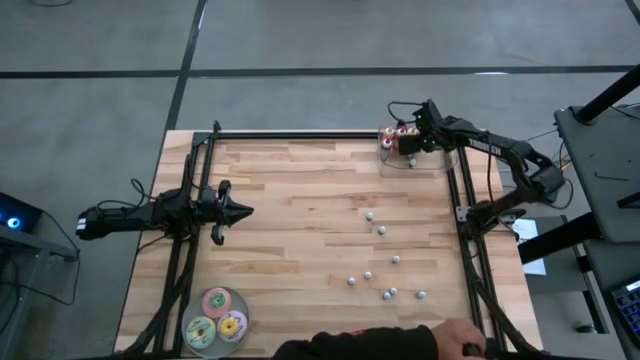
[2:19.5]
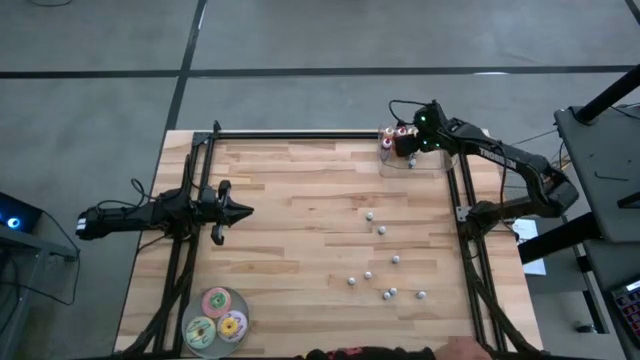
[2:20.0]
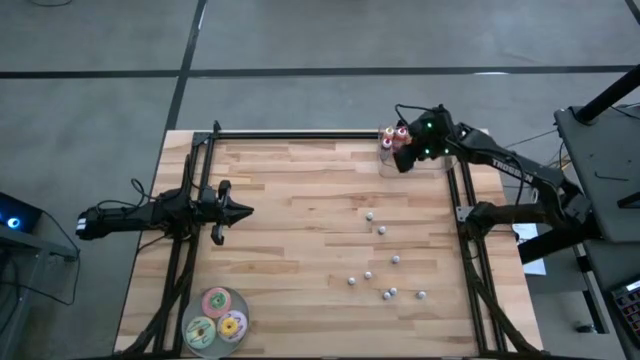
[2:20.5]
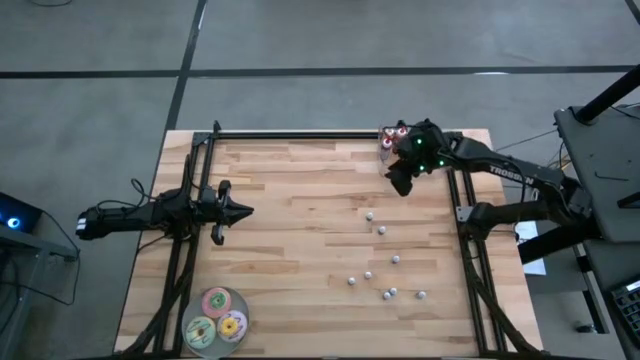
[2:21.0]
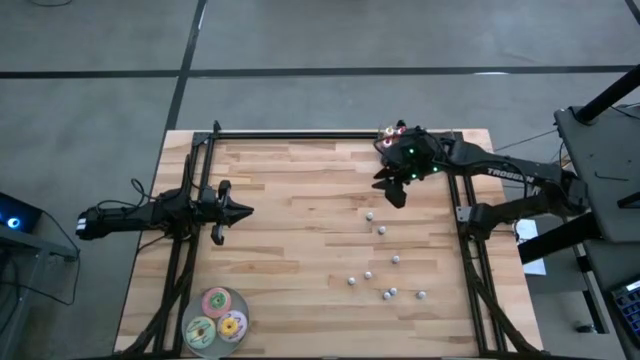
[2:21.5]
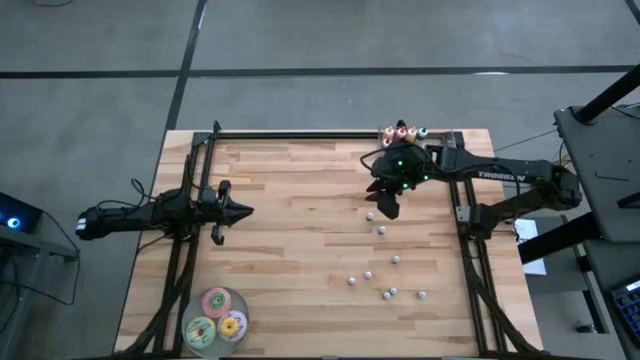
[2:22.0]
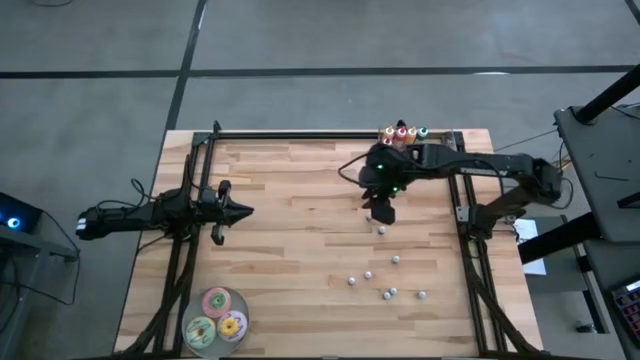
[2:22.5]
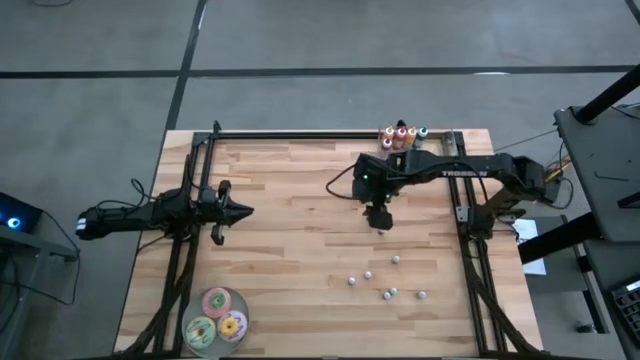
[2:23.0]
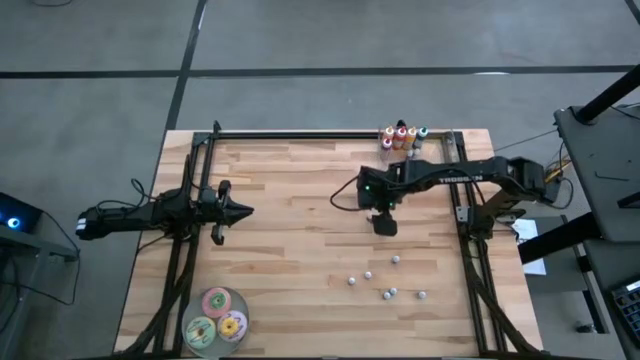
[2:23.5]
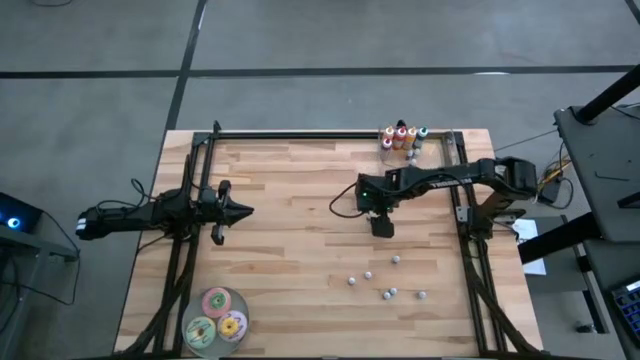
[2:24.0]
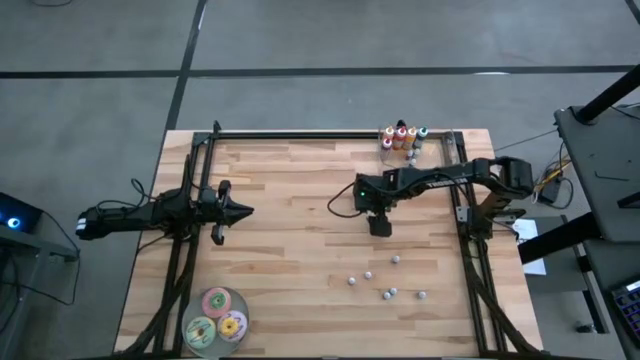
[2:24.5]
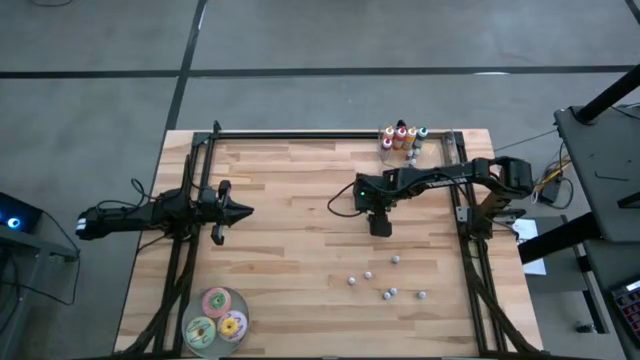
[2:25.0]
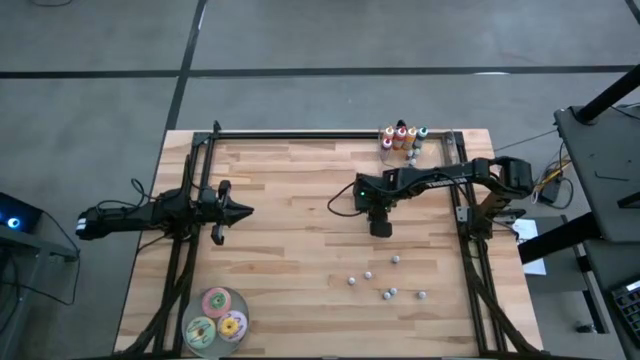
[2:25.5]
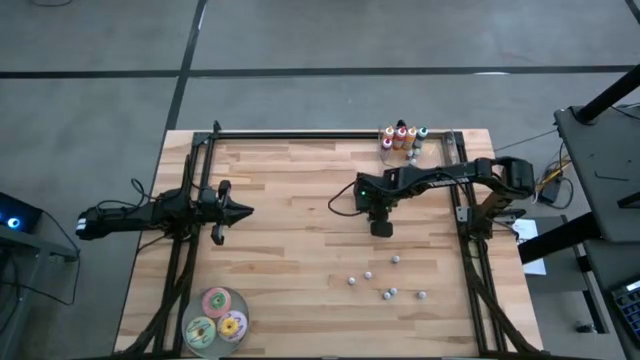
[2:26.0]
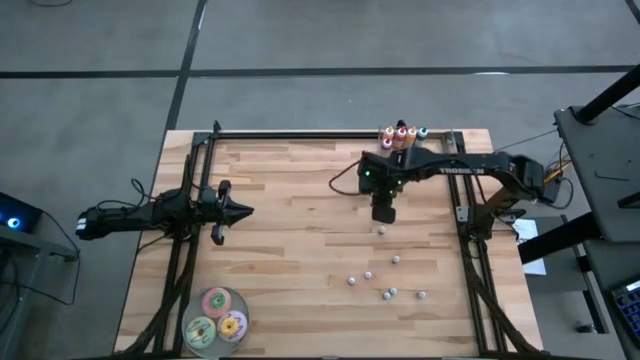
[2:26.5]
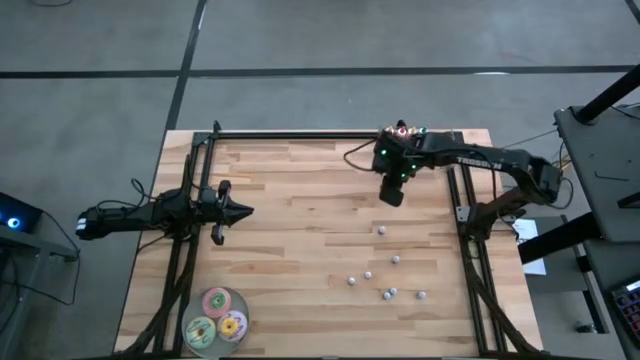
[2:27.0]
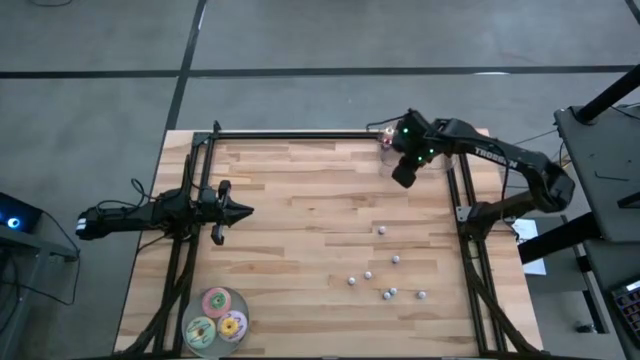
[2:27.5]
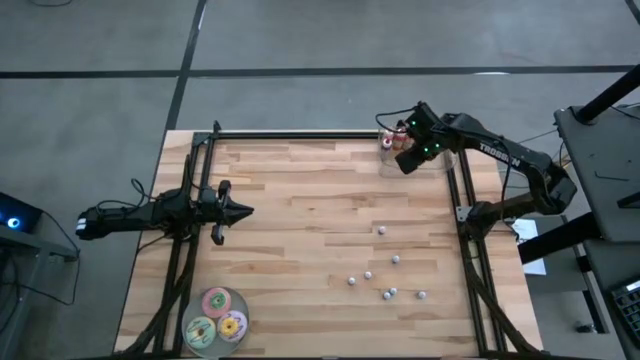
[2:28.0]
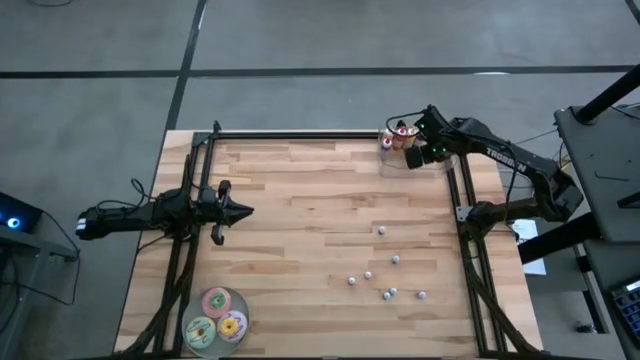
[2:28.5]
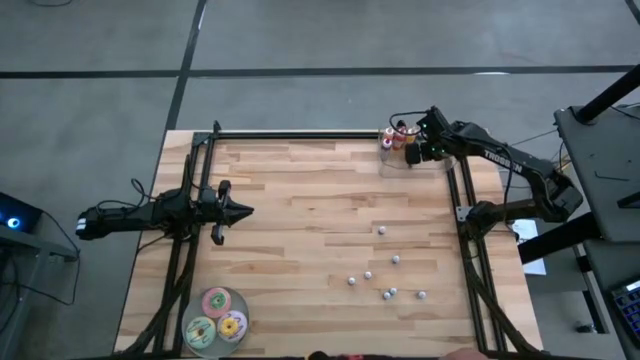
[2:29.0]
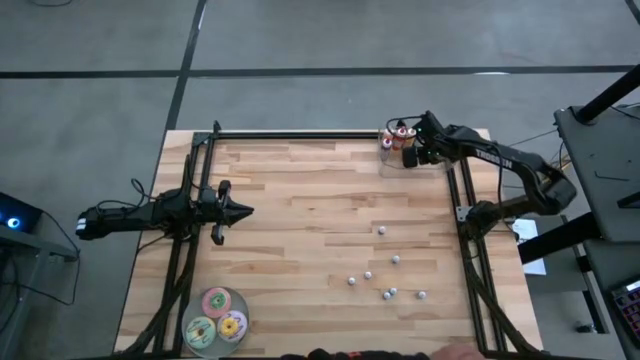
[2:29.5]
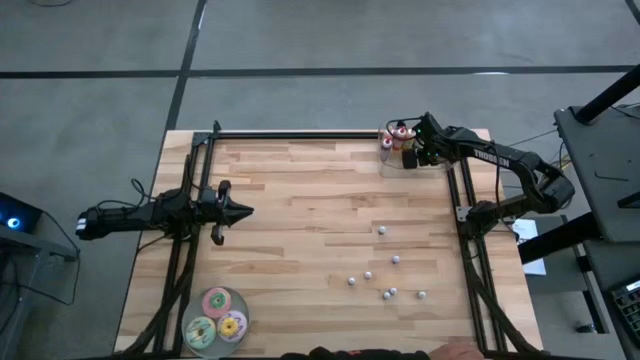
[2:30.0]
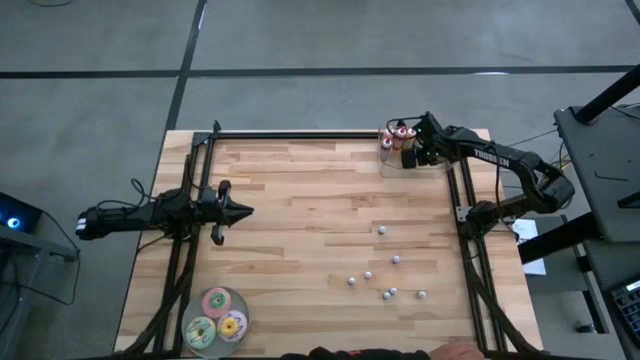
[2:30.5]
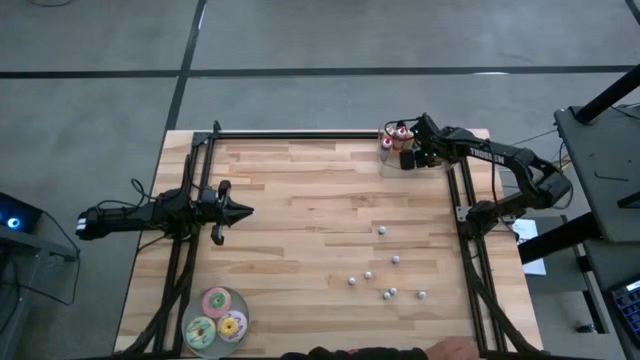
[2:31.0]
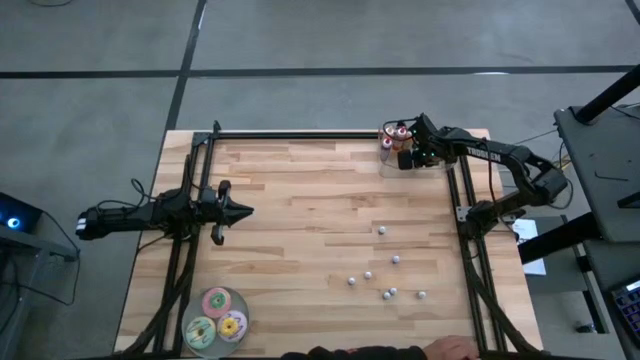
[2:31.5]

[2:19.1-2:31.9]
Task: Pick & Place food coloring
Put the small blue food coloring bottle into the bin

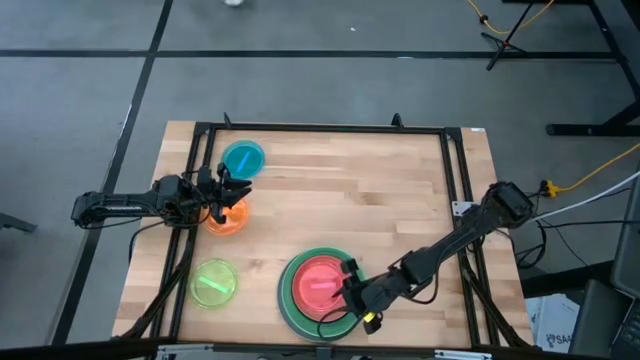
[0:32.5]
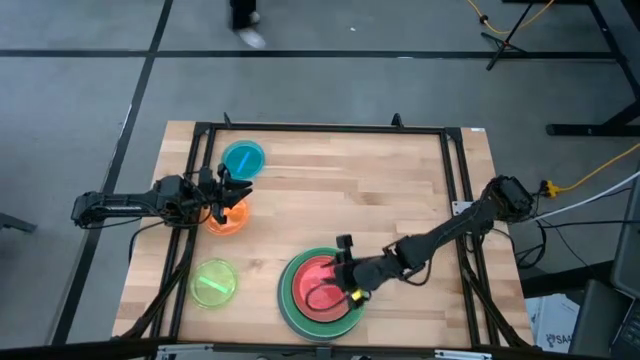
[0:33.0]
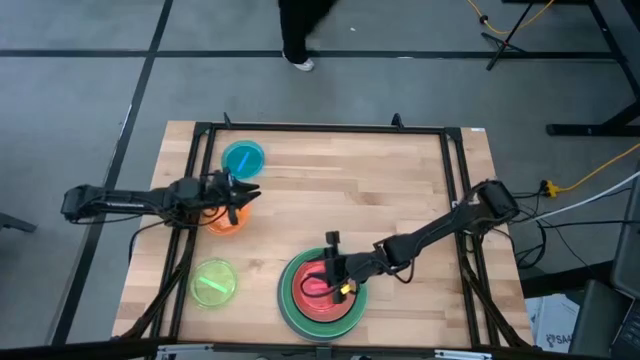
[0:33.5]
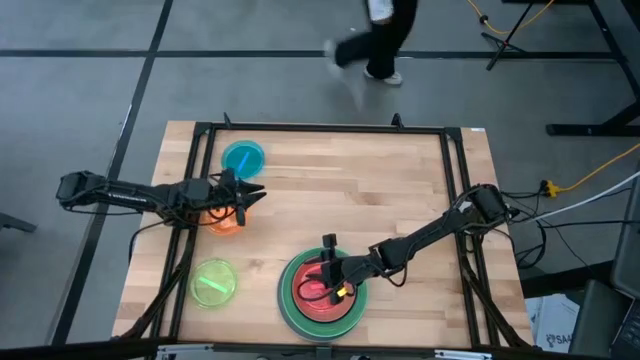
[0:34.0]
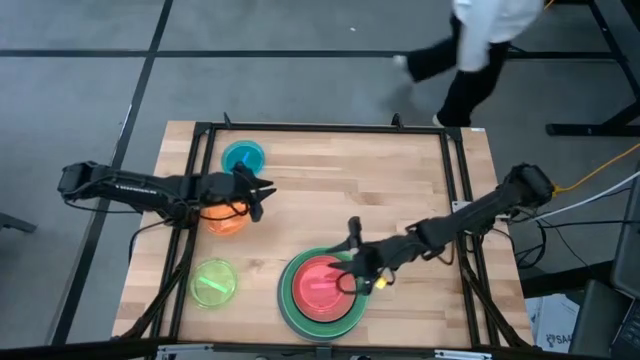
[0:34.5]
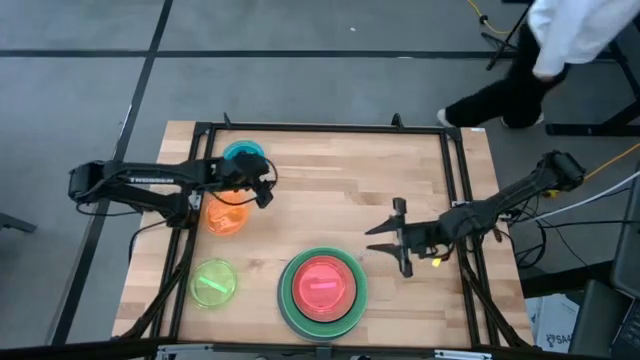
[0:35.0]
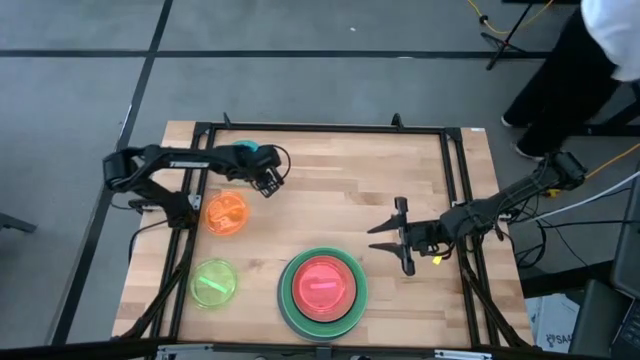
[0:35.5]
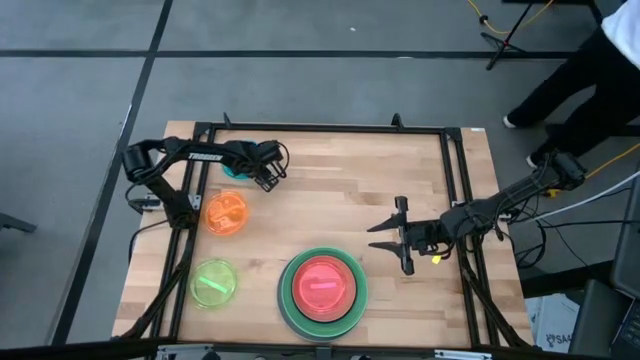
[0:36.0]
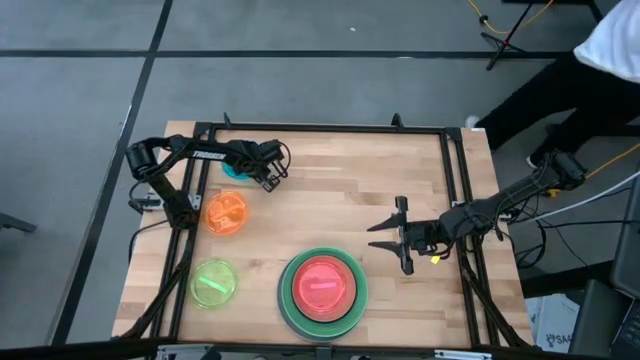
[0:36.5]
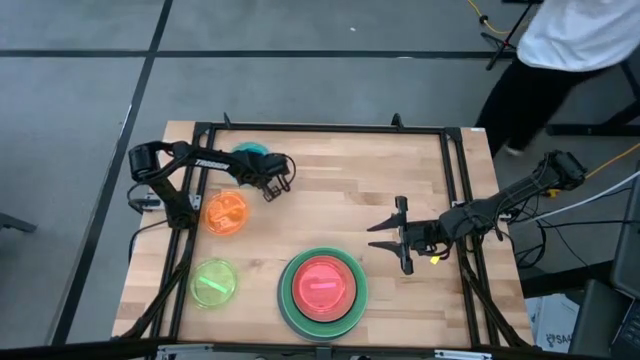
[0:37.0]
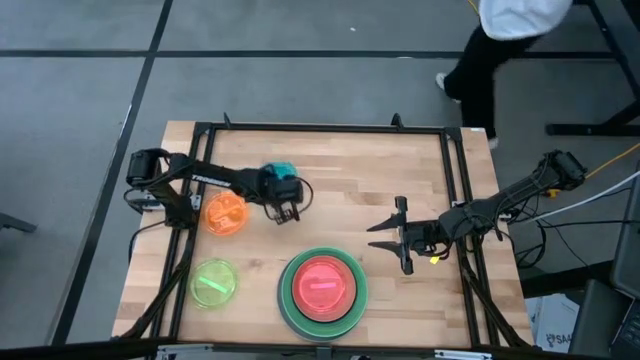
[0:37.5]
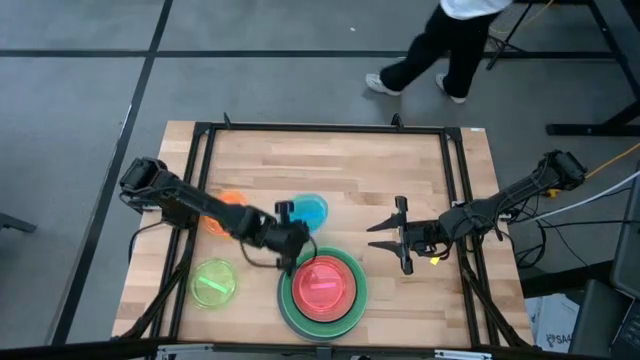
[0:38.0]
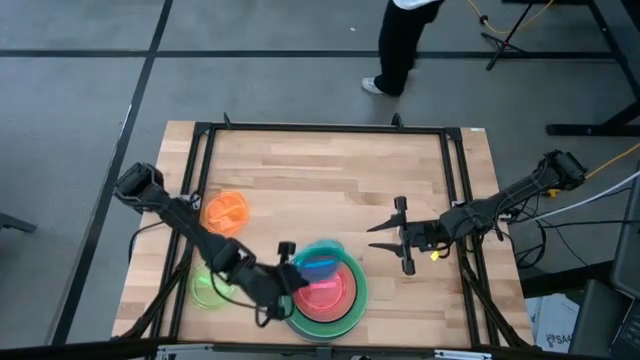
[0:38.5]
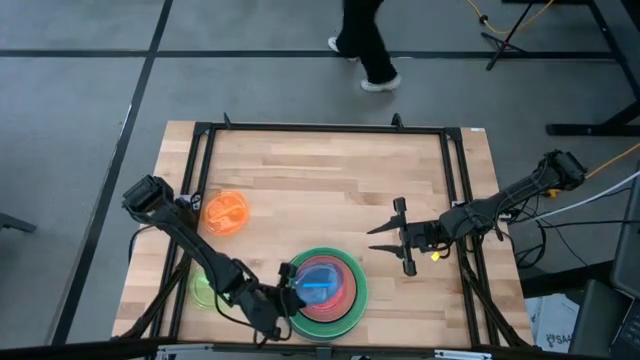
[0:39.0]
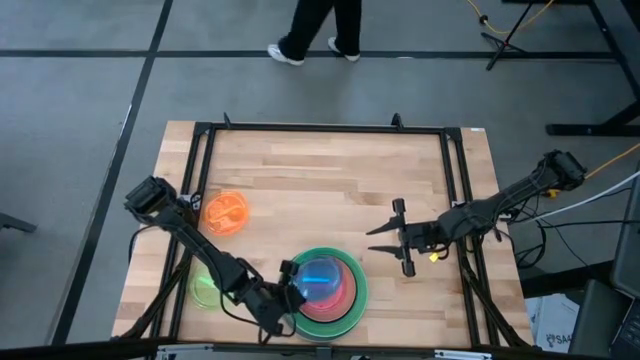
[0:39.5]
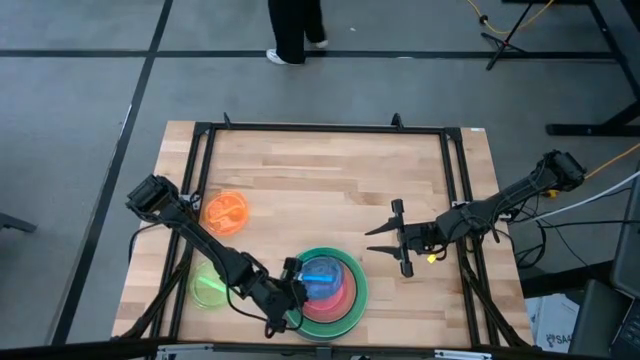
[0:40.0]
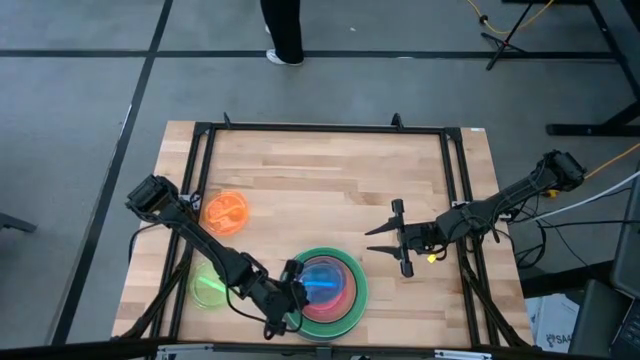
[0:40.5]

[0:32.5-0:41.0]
Task: Stack plastic plates
Stack the blue plate on top of pink plate
